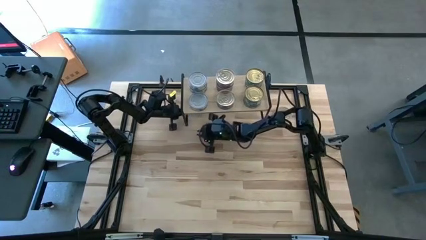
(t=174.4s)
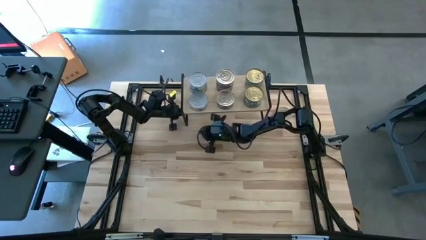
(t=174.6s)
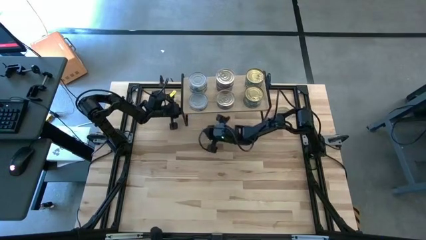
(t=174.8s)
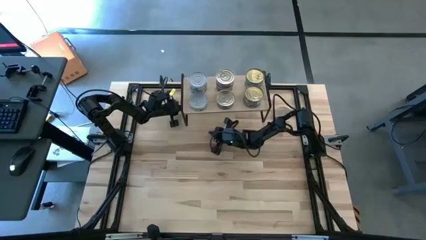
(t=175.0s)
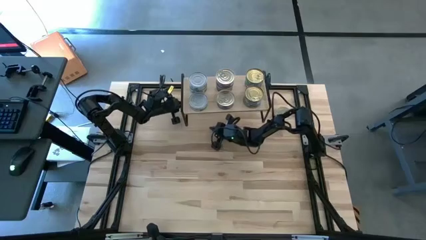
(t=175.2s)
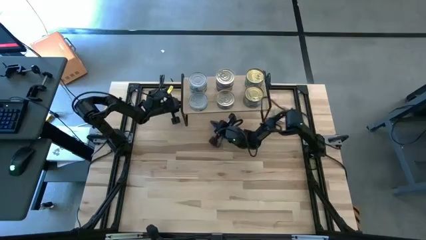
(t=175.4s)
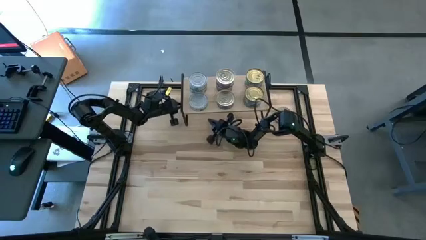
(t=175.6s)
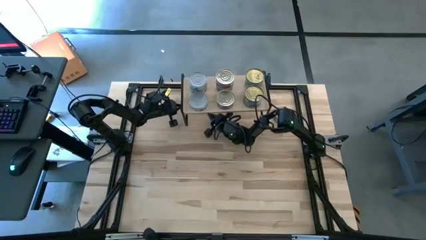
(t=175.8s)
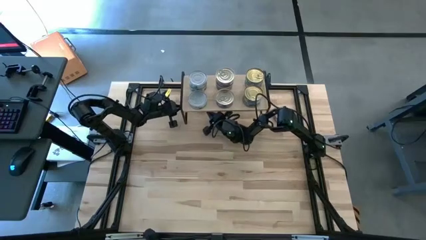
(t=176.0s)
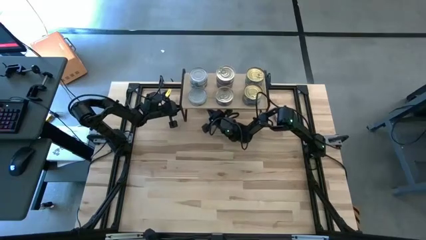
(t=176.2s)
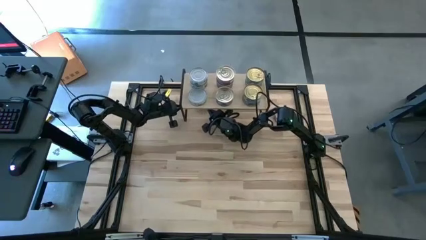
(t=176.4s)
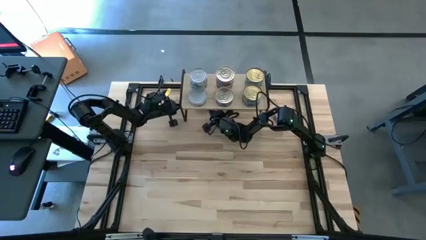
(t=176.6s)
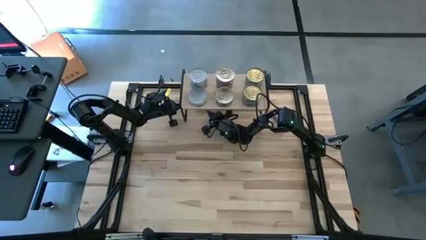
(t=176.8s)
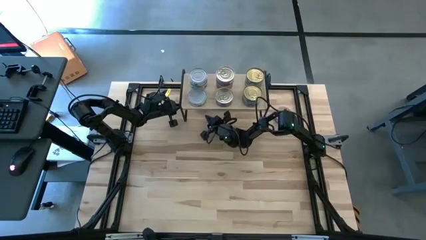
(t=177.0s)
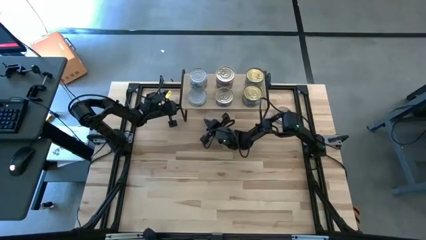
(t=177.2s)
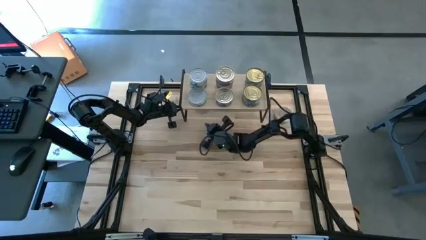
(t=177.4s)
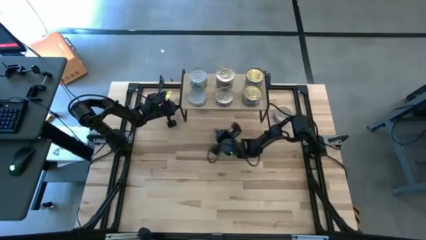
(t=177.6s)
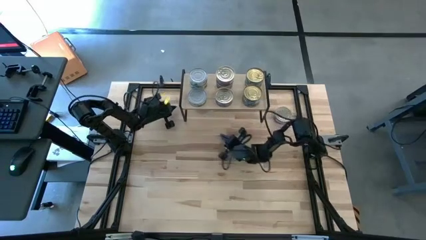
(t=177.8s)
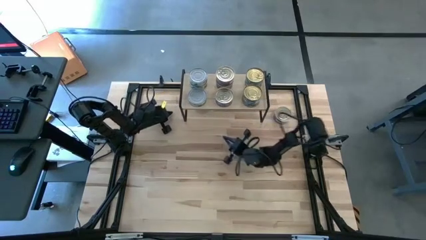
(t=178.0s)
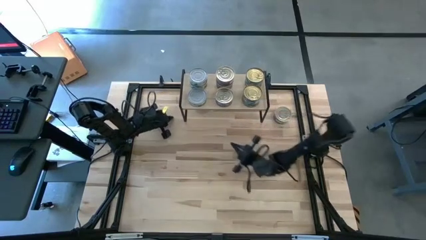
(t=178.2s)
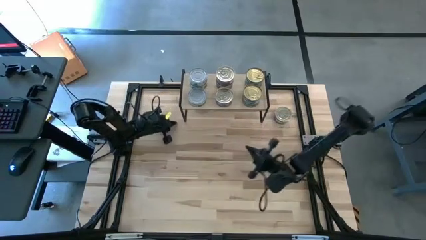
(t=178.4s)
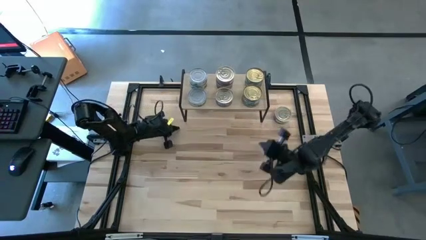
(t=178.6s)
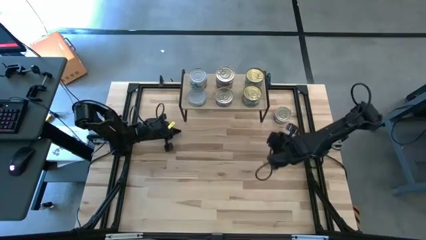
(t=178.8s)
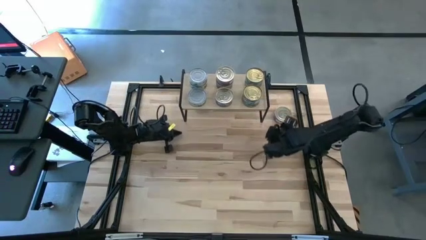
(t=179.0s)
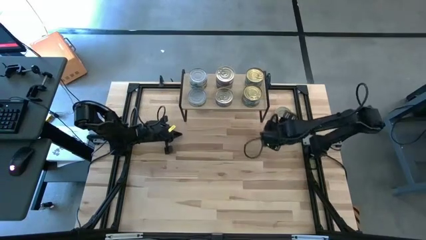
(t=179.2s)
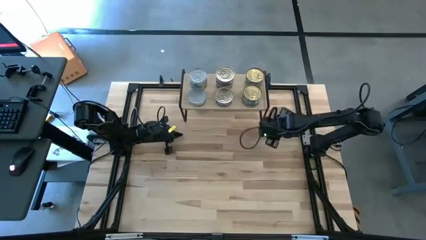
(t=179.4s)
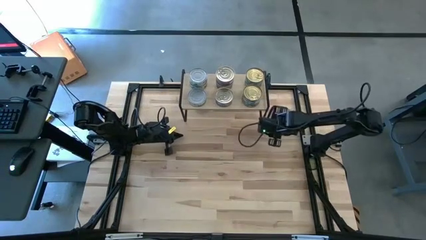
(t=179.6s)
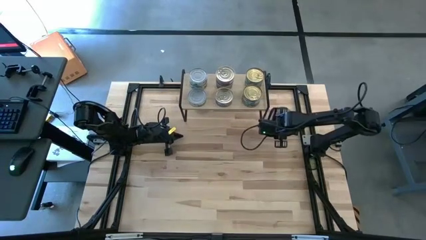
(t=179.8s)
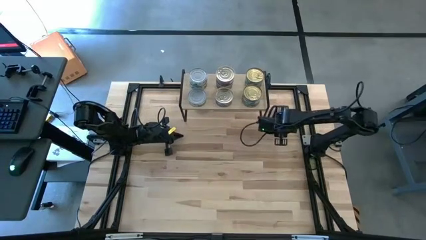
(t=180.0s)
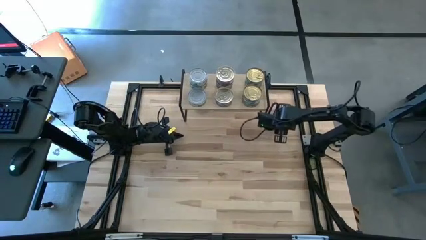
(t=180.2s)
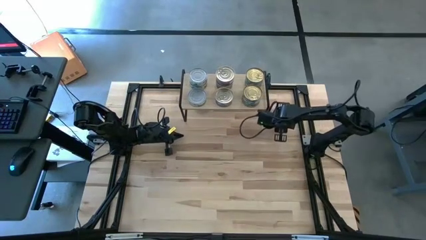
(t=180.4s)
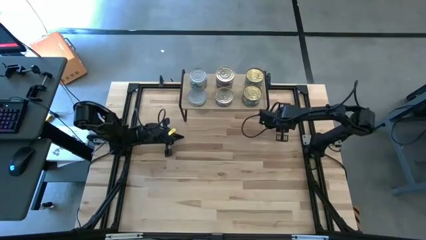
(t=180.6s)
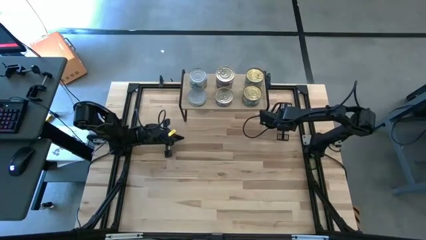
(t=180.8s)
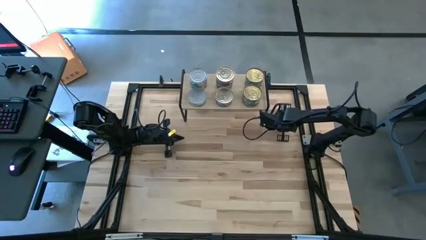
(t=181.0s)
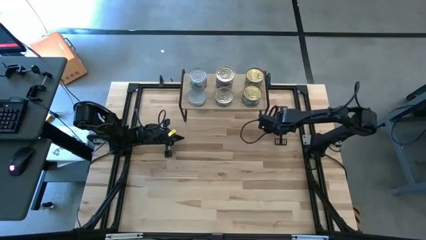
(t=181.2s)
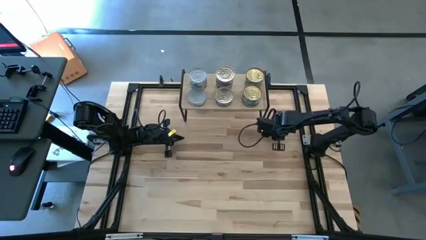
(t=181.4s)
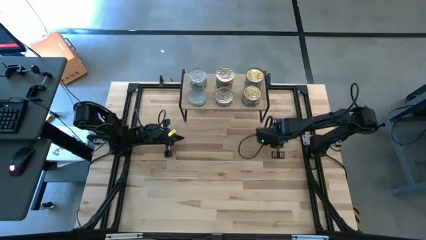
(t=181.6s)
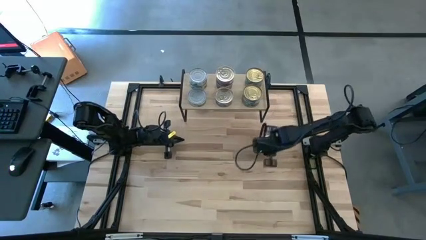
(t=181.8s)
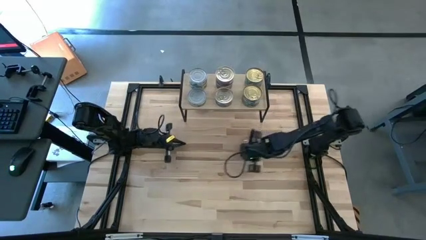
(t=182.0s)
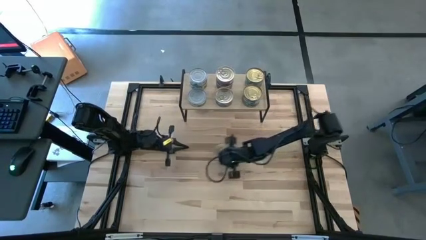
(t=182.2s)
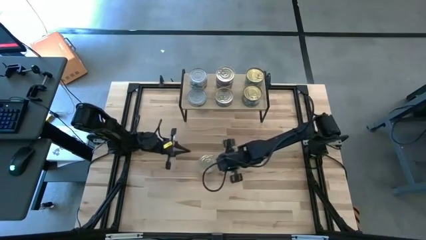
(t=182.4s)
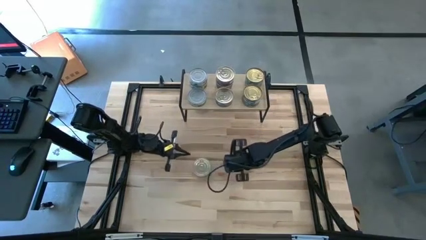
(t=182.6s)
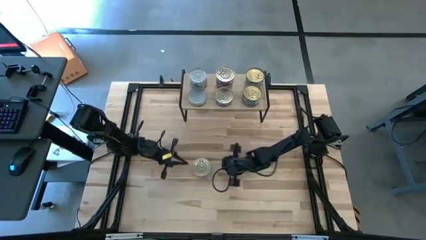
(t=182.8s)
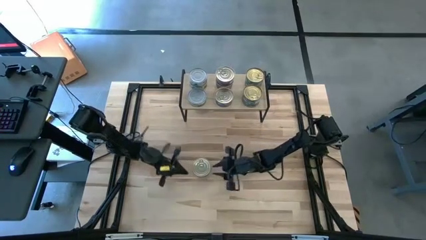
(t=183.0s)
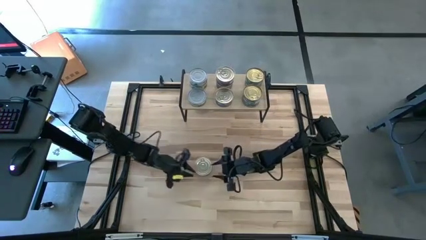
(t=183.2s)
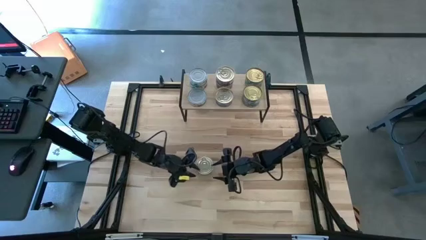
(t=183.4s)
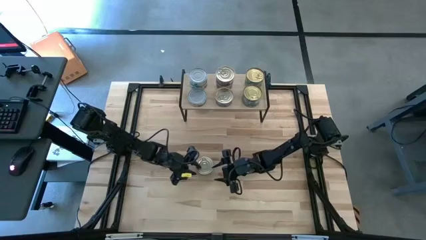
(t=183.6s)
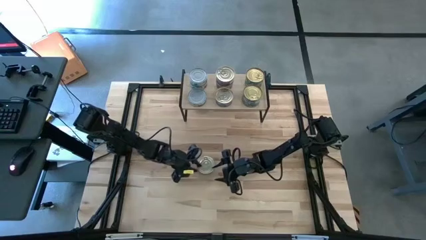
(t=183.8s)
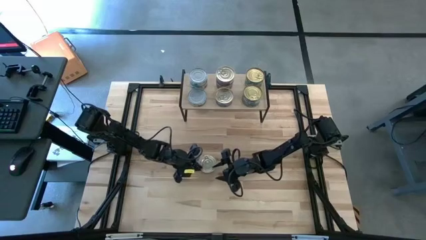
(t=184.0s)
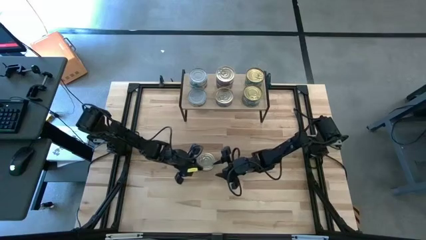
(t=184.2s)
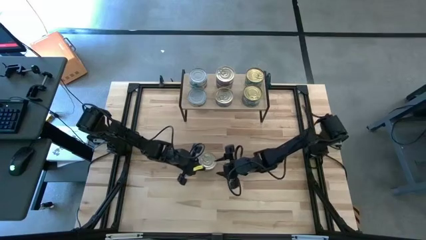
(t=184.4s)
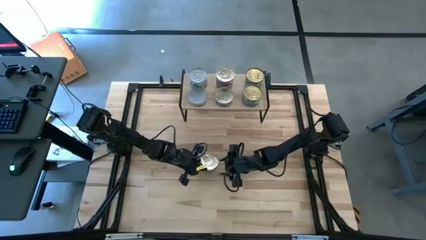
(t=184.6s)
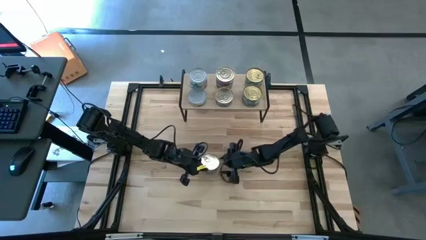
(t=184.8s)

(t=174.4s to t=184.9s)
Task: Stack canned seafood by type on shelf
Stack the blue tuna can on top of the other blue tuna can on the shelf

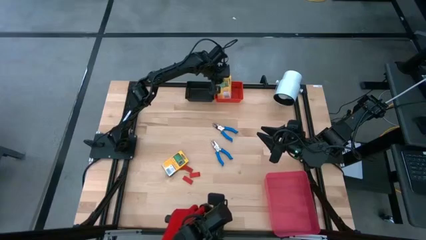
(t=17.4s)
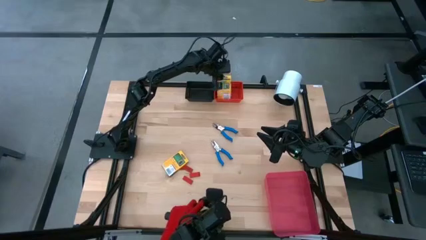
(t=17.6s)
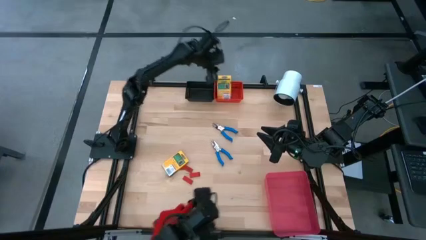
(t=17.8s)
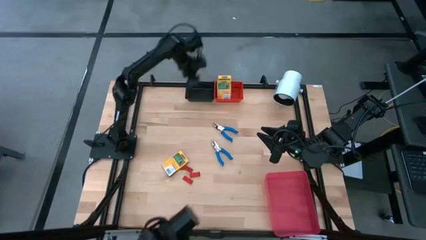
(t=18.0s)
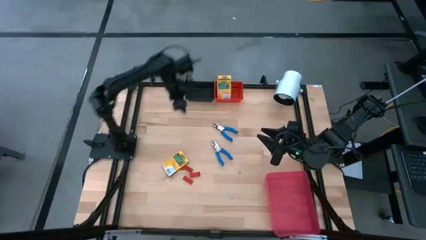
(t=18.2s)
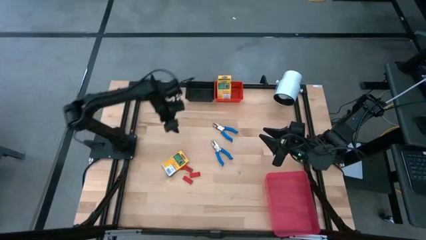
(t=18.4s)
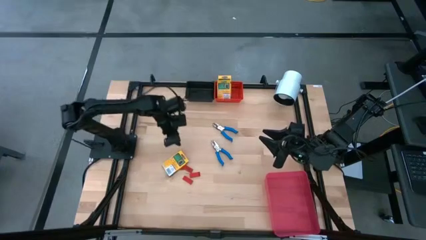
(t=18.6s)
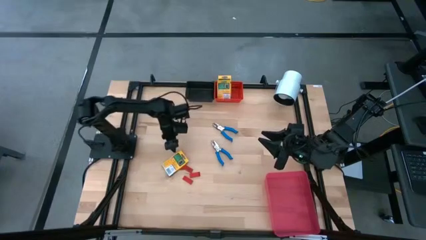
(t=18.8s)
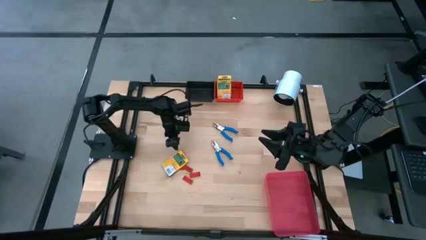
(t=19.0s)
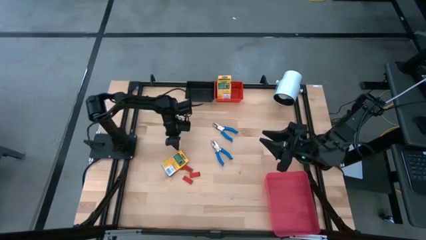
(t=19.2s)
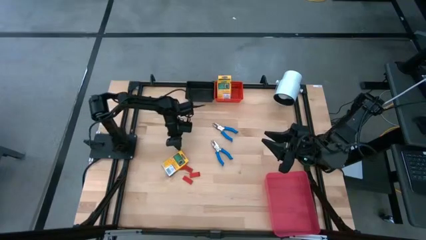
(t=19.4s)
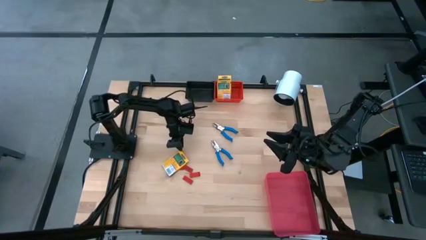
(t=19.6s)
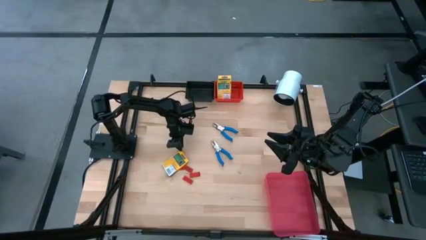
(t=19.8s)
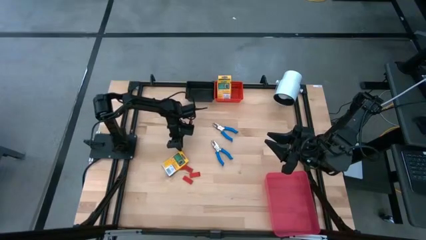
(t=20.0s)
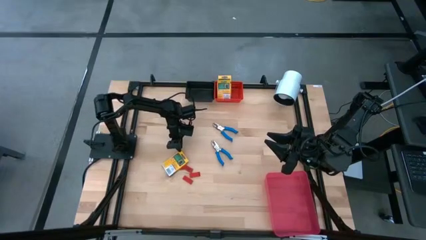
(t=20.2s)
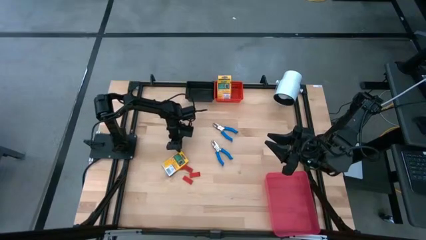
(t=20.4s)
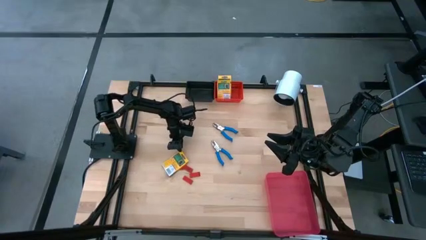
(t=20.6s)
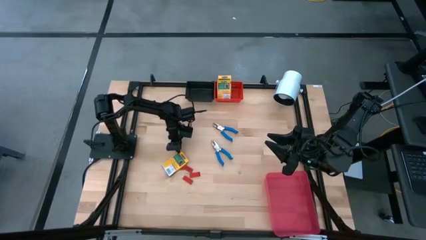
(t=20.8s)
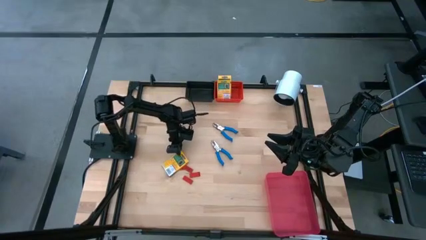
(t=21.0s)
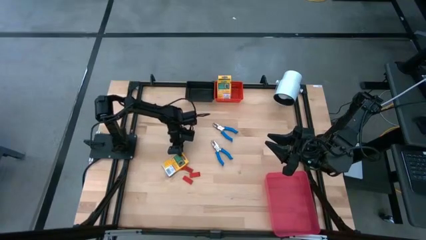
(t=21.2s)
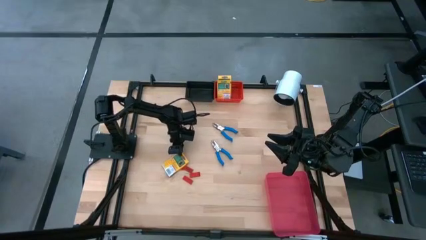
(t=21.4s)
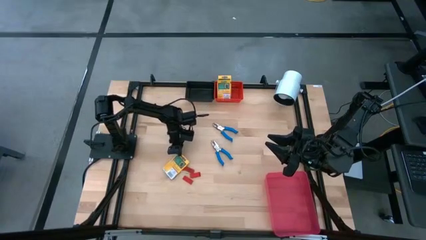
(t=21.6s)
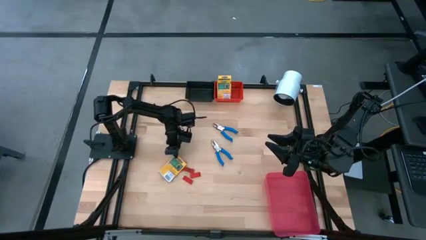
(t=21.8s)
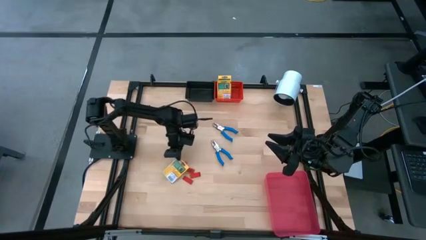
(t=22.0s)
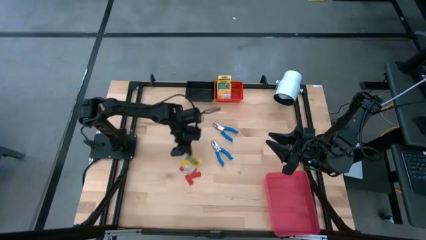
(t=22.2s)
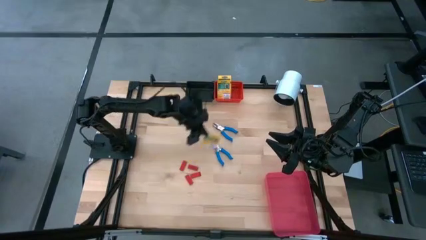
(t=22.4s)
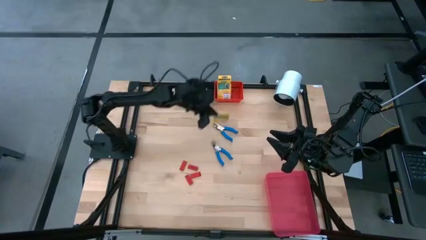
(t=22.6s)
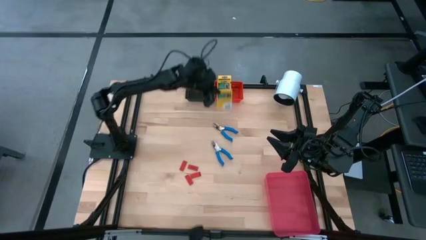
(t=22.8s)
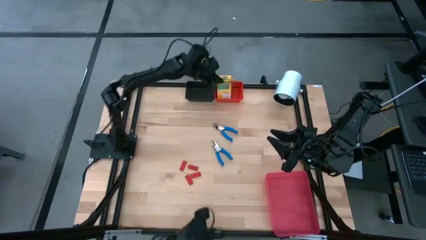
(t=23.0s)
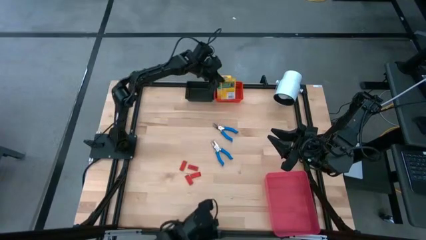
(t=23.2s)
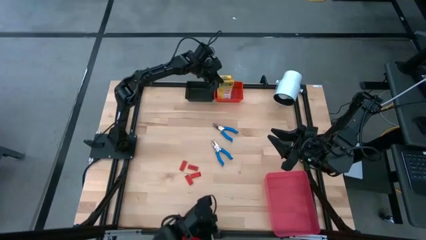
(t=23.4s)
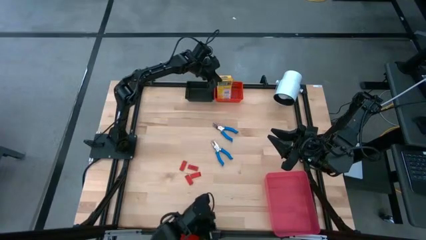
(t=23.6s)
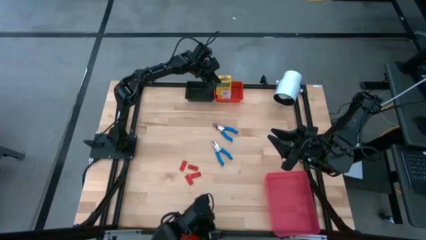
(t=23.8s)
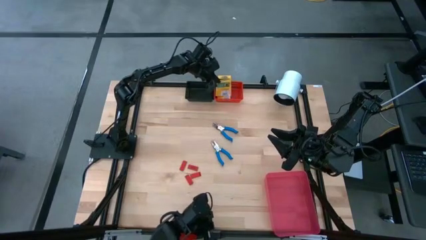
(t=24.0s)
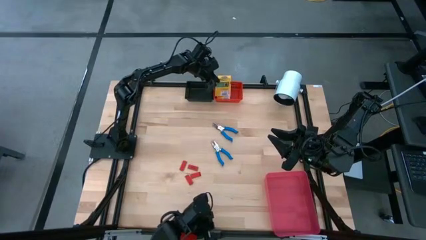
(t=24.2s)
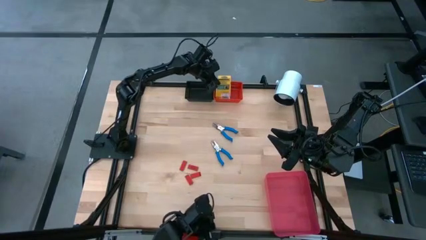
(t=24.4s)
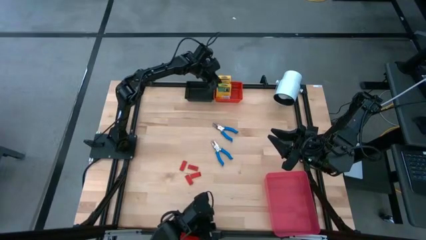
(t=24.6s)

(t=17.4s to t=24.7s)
Task: Pick & Place School Supplies
Put the yellow crayon box into the red bin
